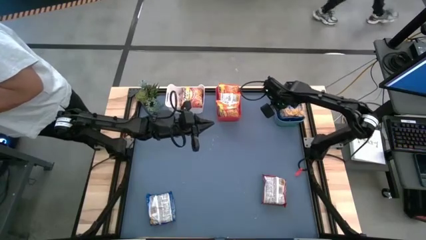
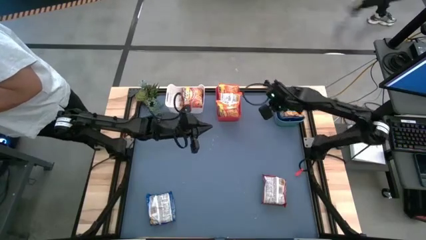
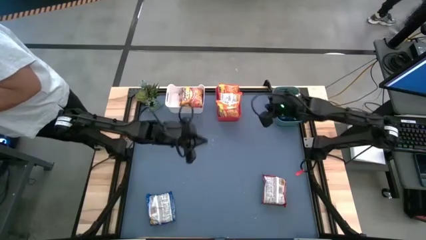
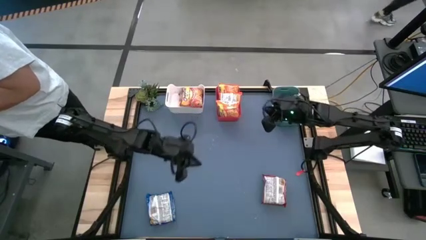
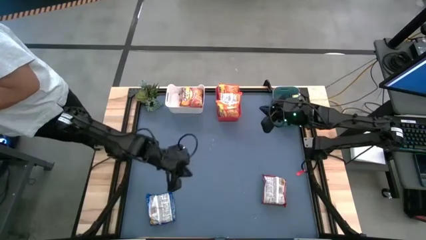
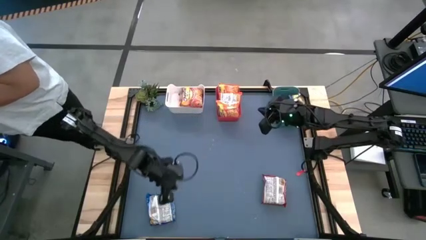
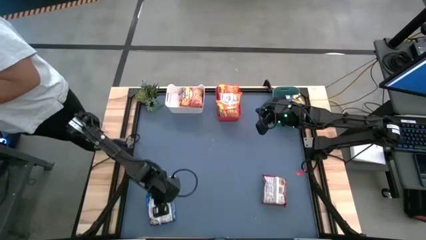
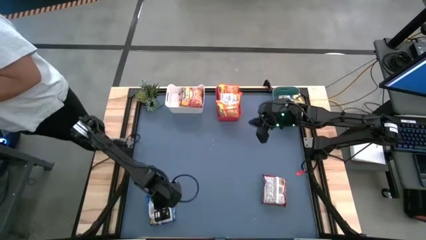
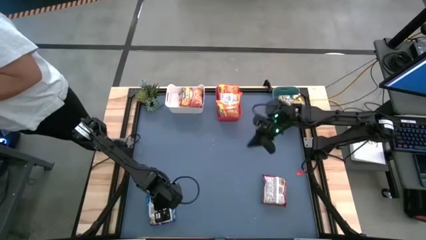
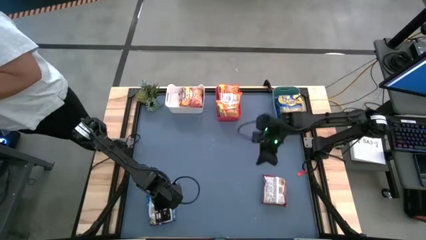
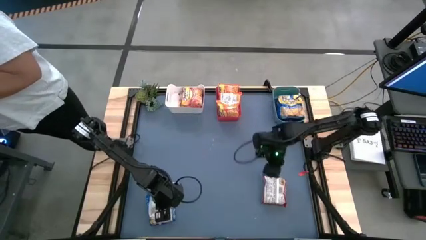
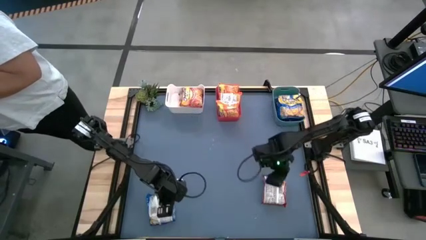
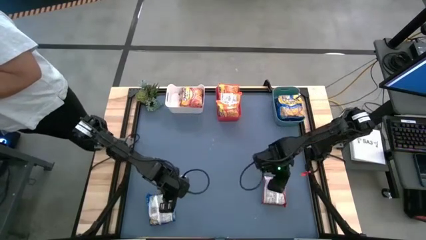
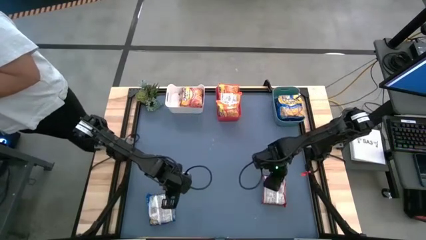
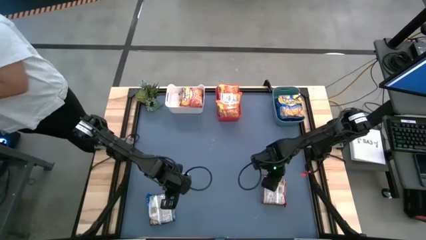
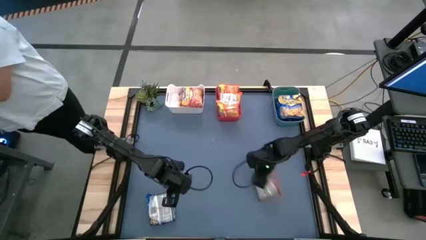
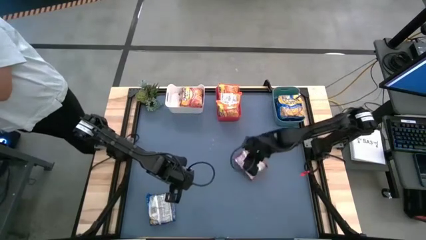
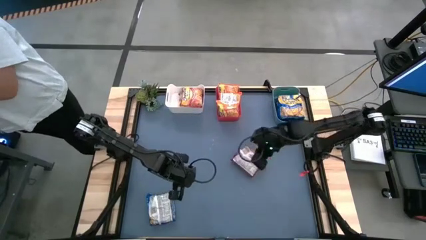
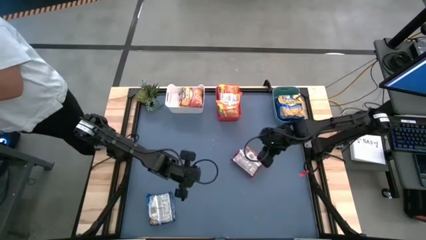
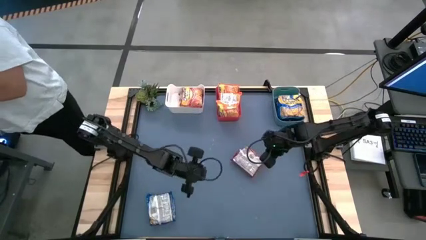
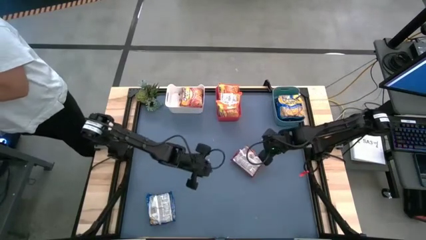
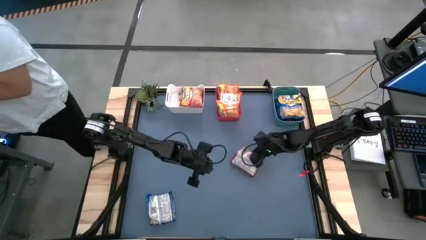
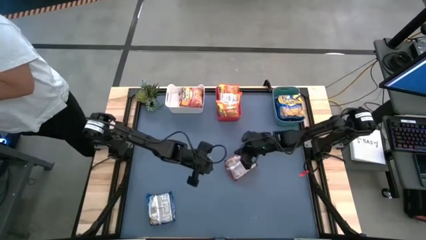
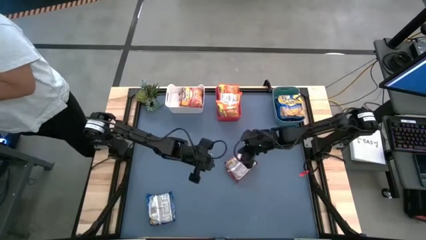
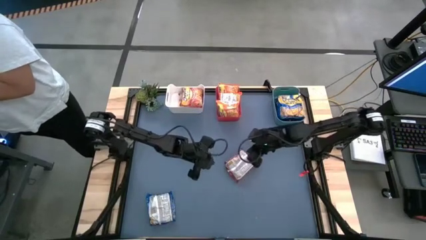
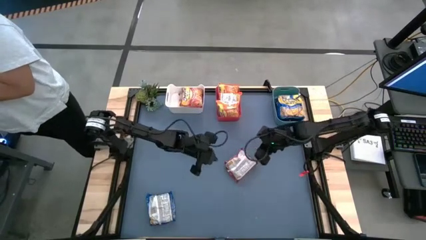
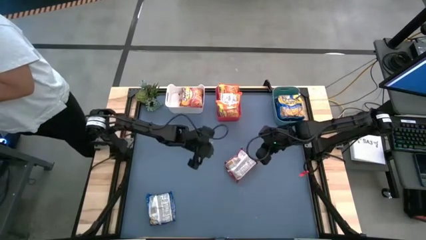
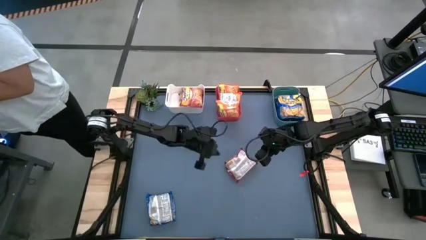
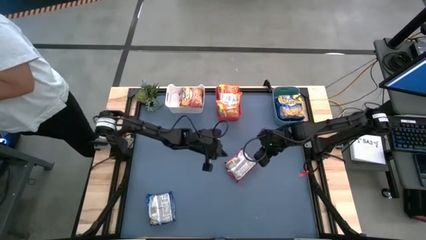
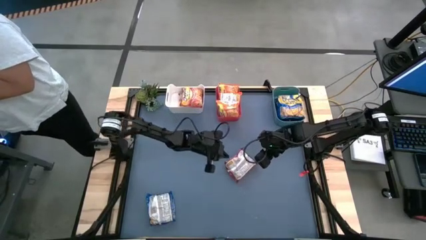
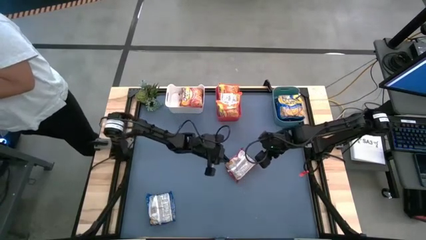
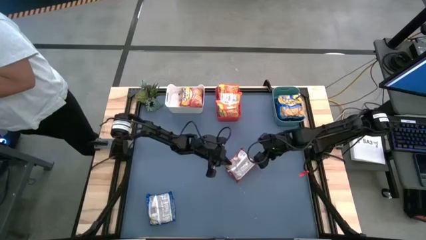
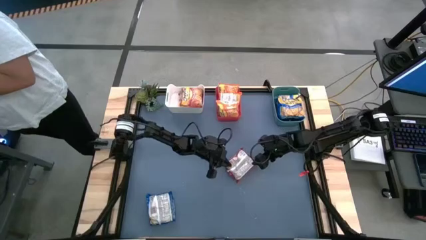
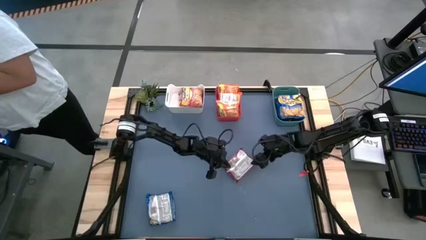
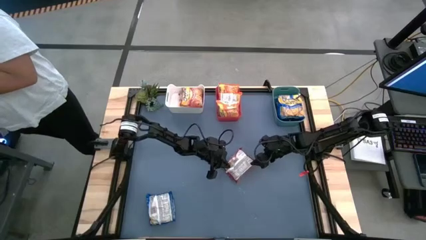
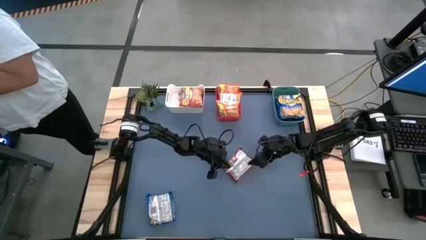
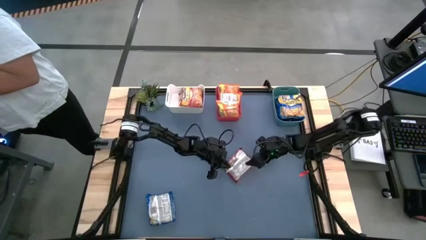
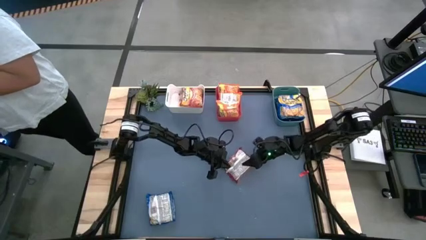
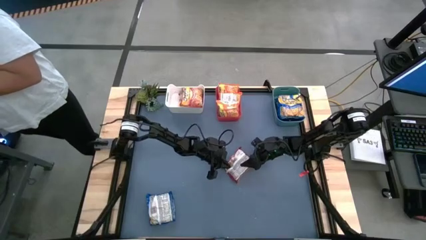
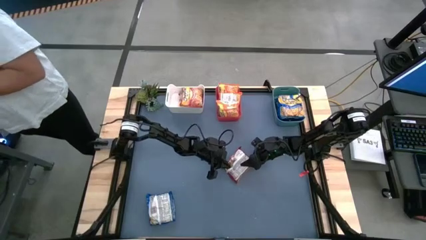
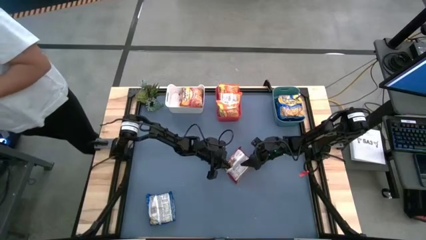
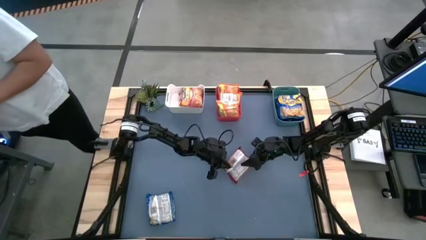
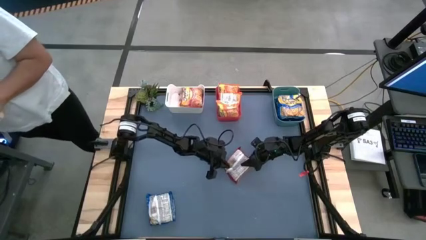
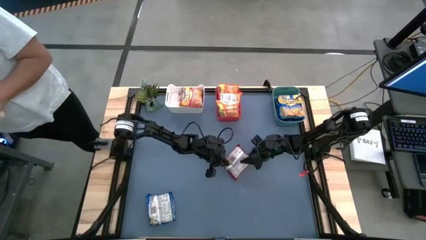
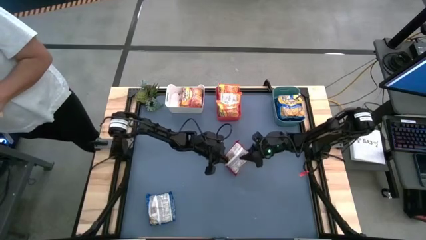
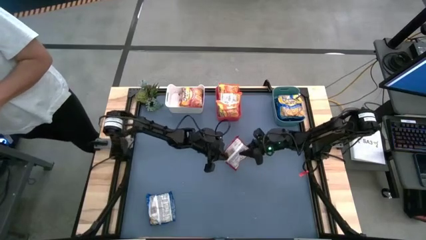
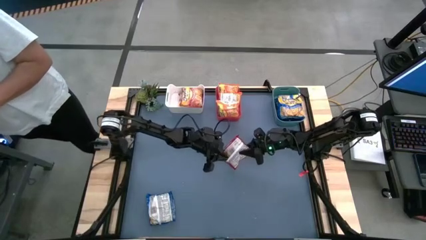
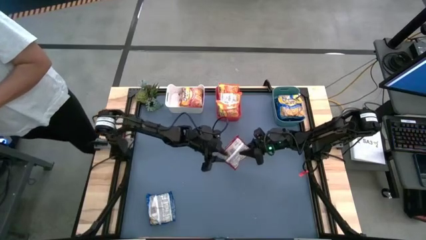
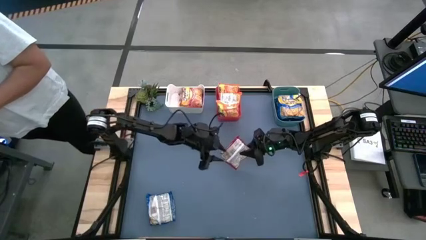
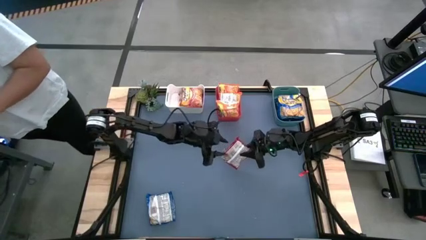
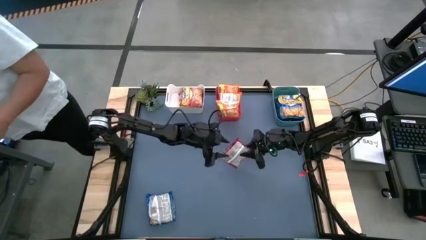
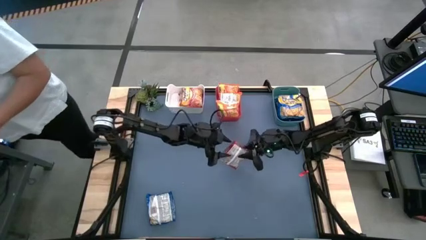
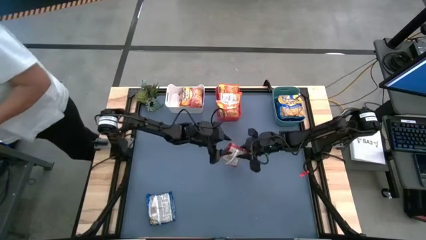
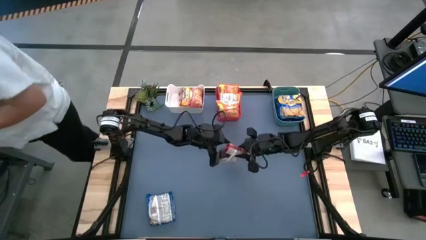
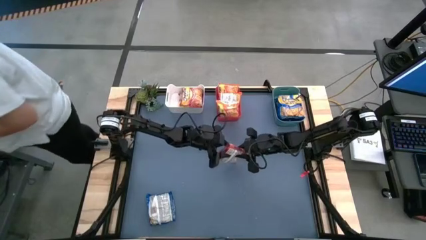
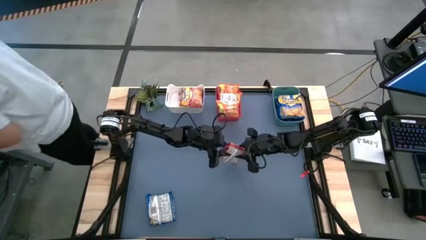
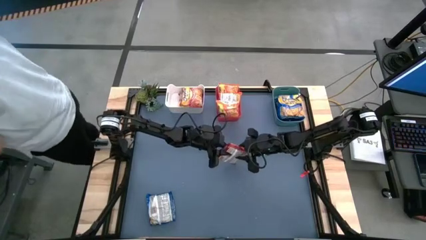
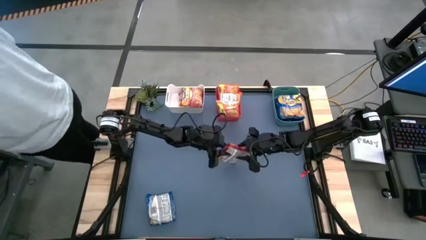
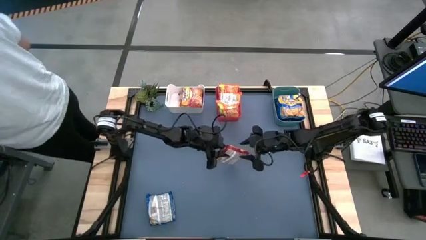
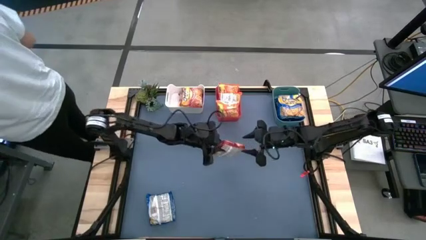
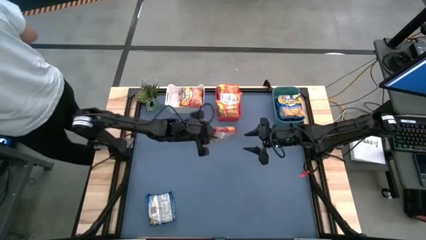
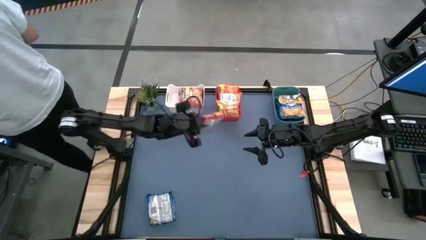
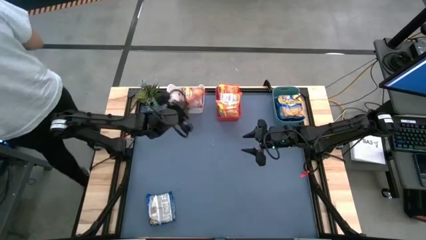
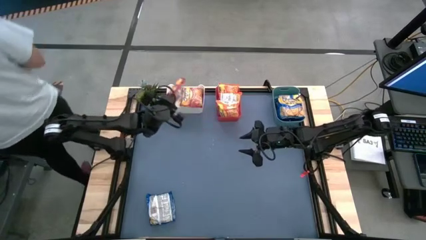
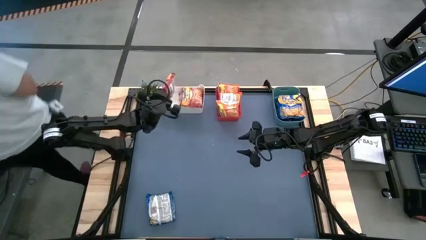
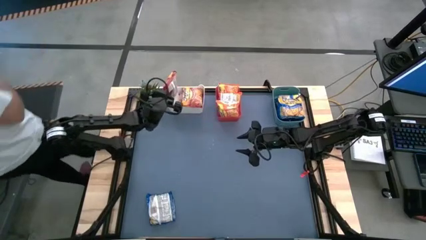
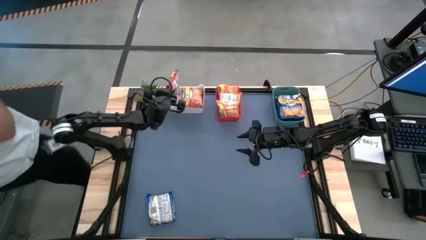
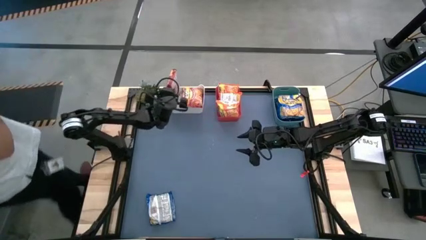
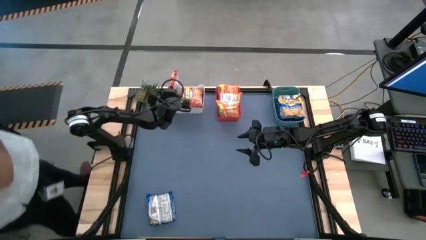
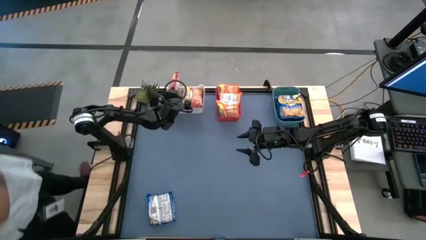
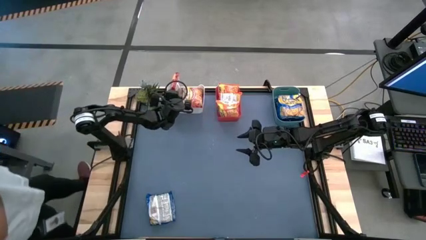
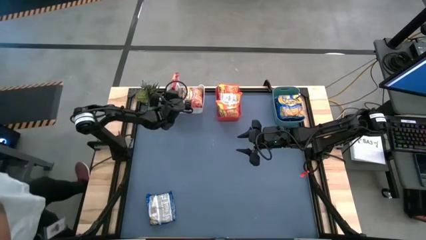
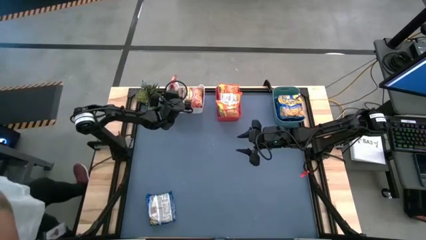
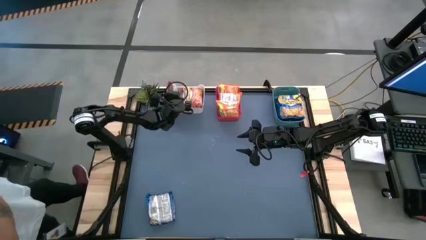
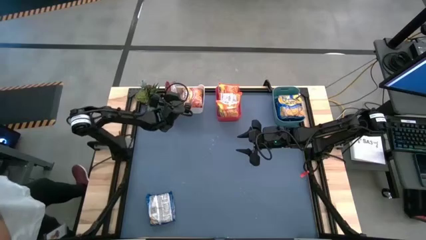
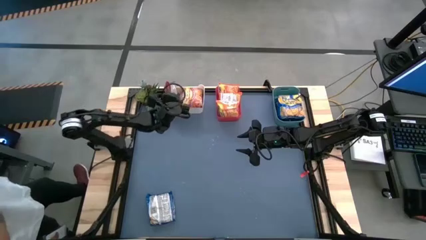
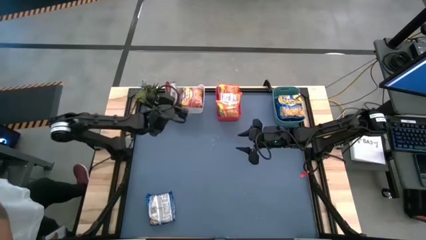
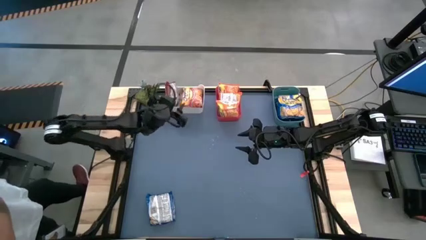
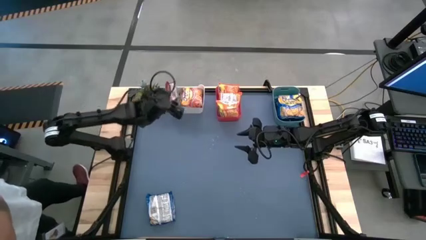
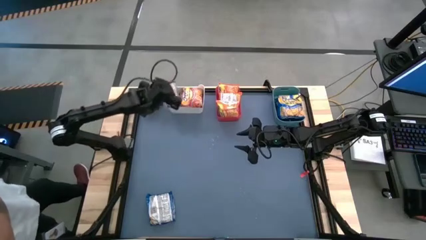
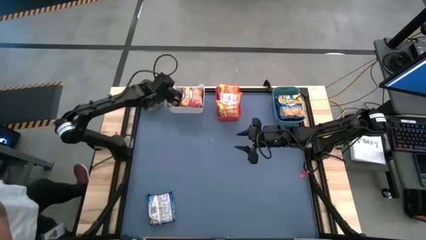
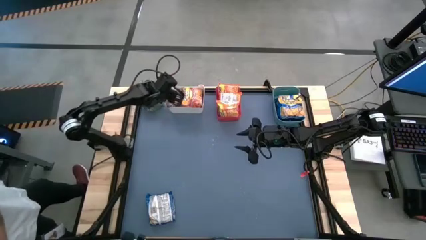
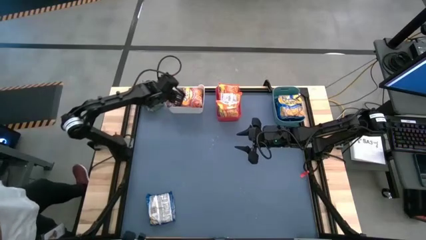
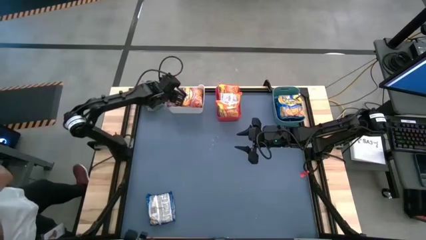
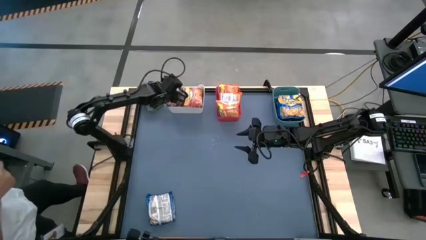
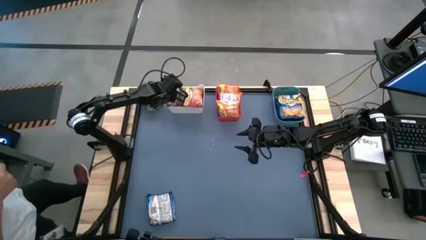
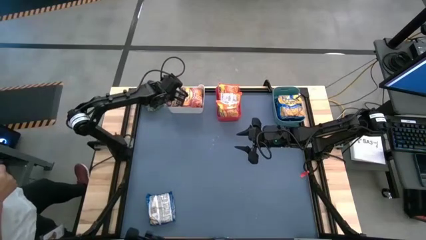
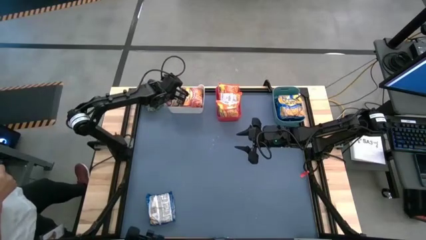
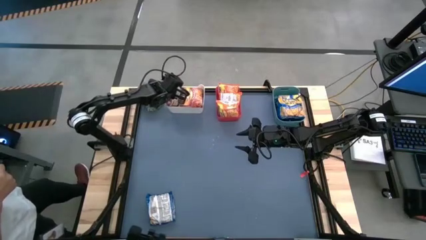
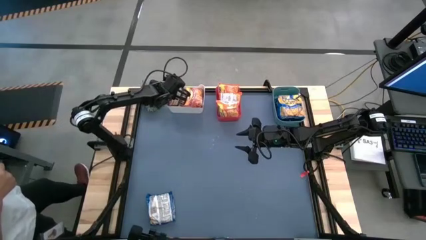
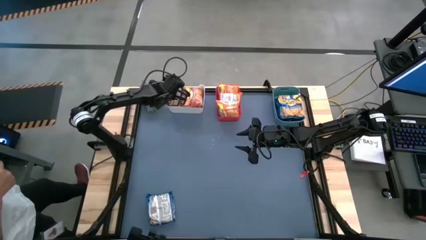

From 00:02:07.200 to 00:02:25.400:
Task: Sort Maruchan noodles
Put the red noodle pack into the white bin
